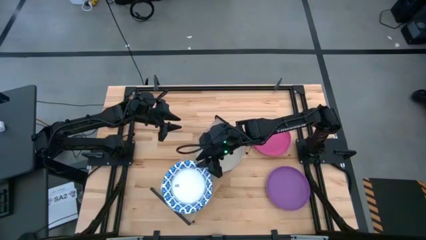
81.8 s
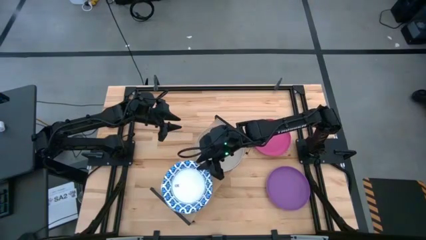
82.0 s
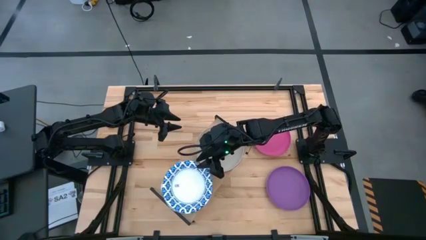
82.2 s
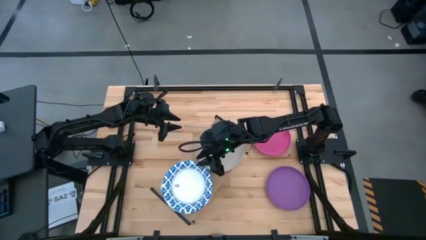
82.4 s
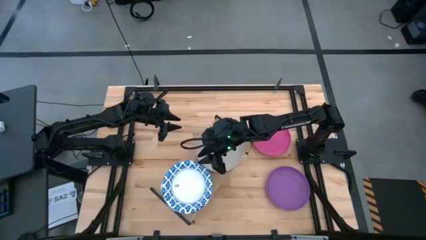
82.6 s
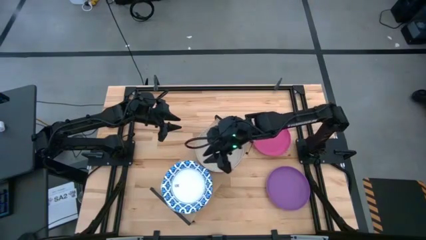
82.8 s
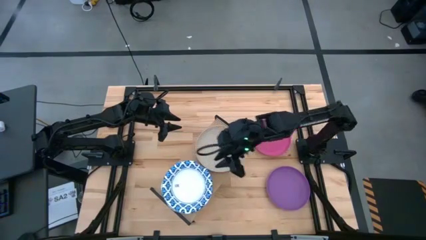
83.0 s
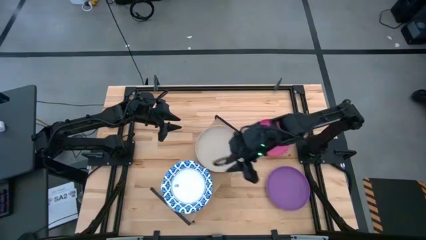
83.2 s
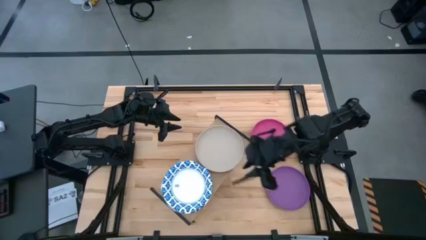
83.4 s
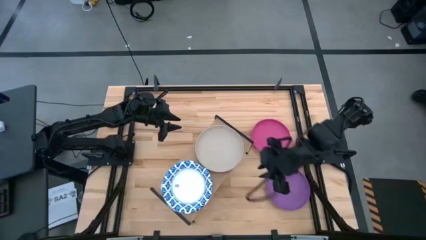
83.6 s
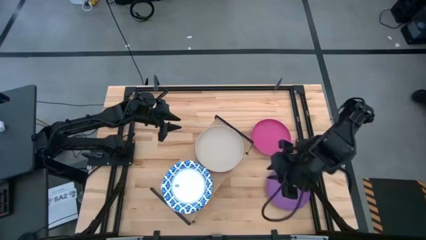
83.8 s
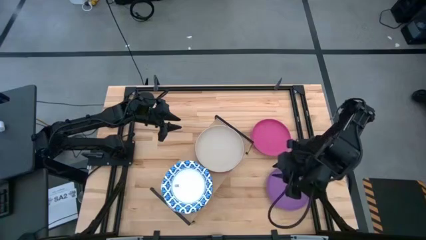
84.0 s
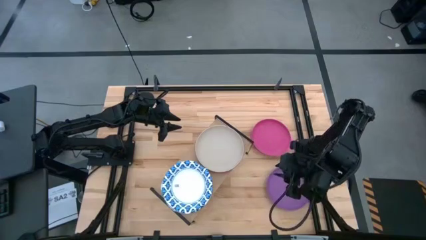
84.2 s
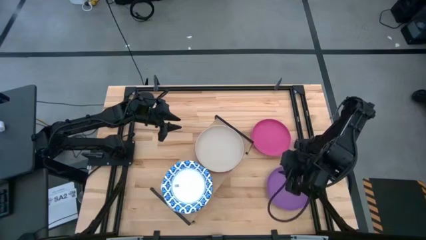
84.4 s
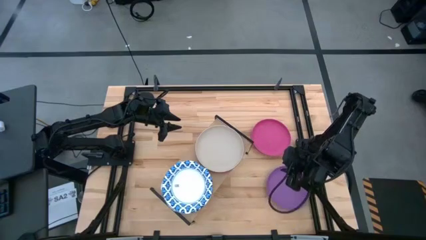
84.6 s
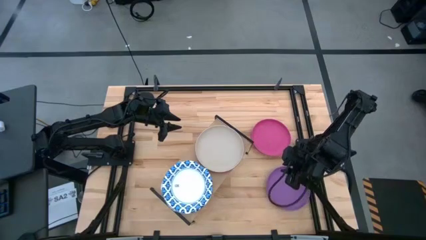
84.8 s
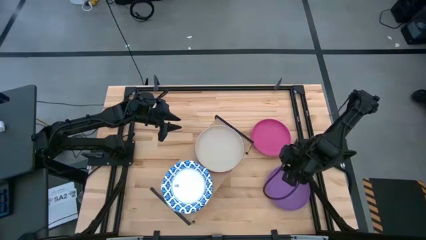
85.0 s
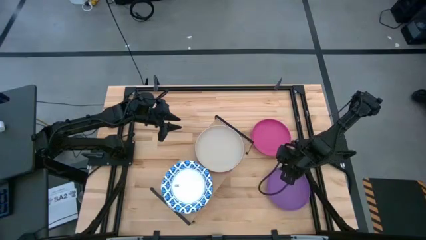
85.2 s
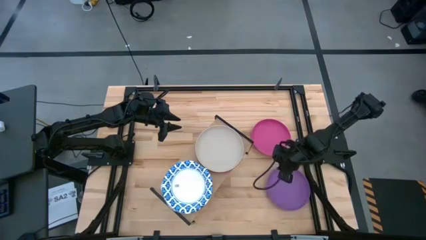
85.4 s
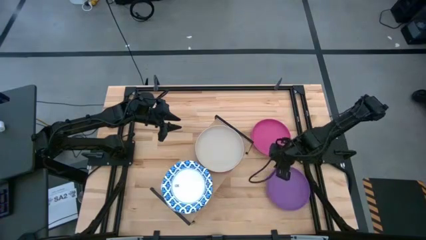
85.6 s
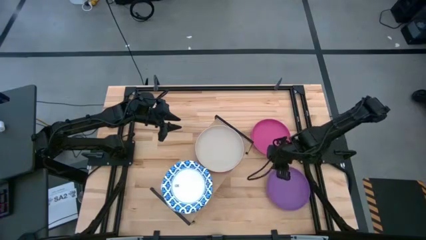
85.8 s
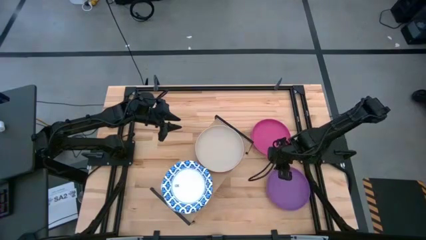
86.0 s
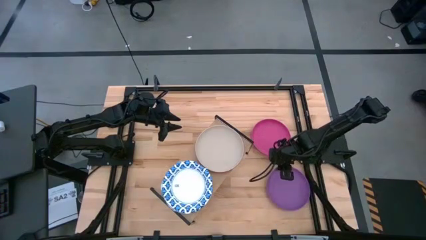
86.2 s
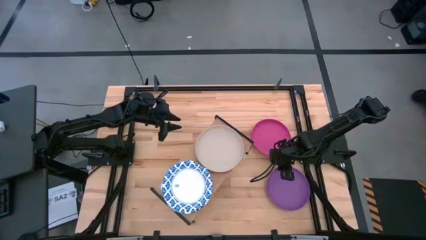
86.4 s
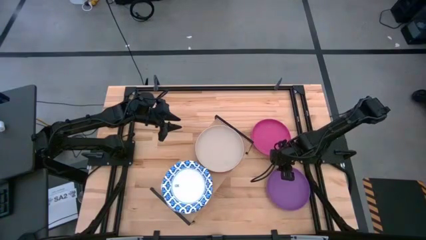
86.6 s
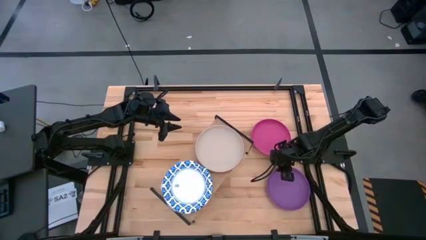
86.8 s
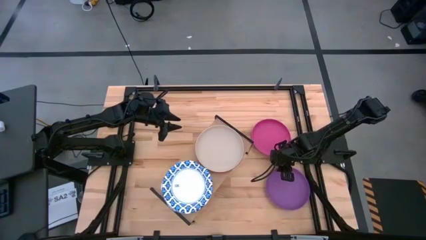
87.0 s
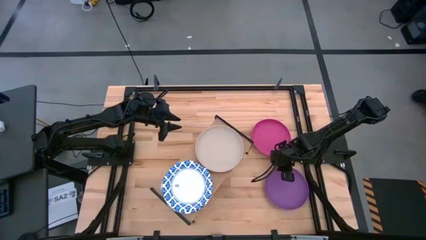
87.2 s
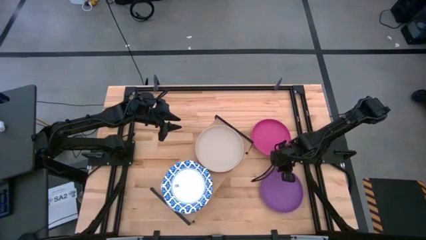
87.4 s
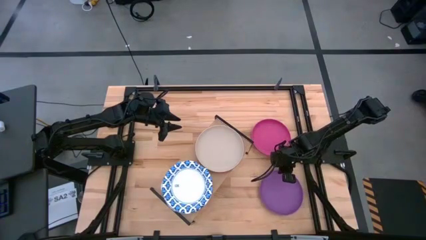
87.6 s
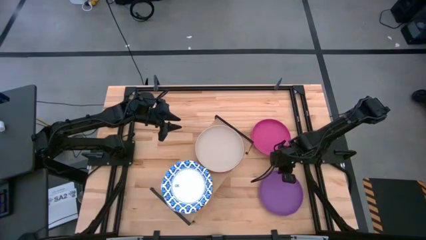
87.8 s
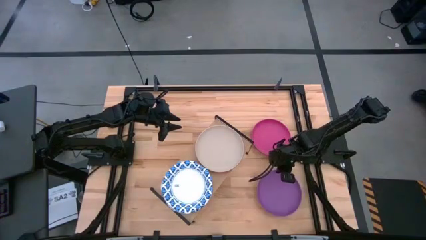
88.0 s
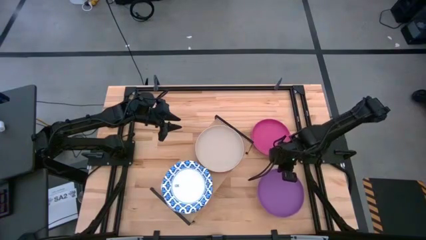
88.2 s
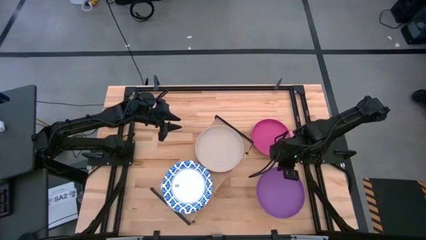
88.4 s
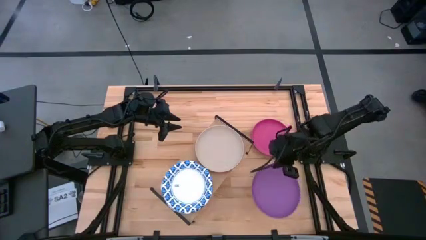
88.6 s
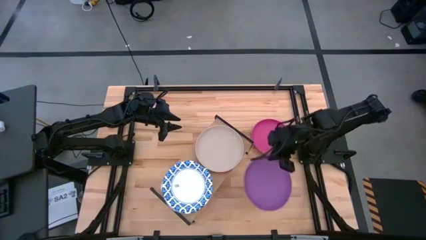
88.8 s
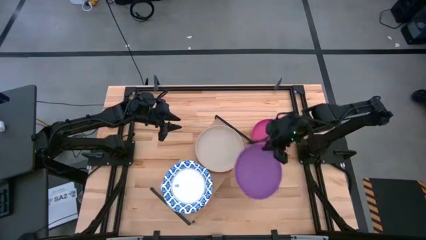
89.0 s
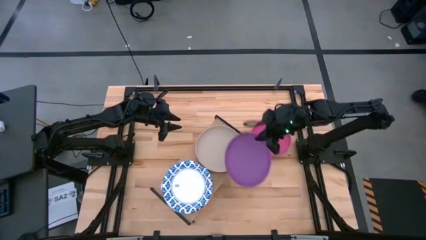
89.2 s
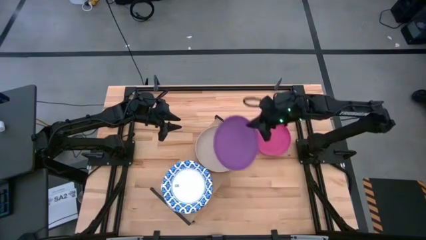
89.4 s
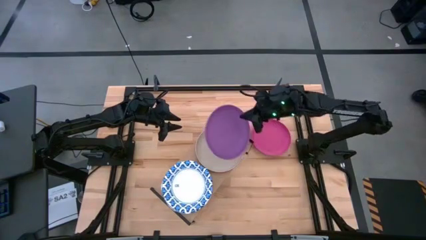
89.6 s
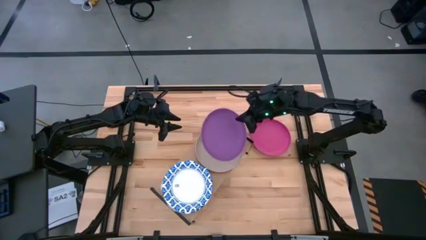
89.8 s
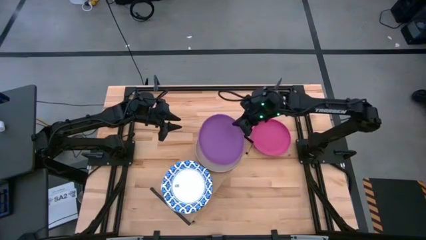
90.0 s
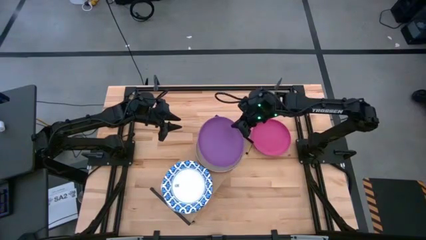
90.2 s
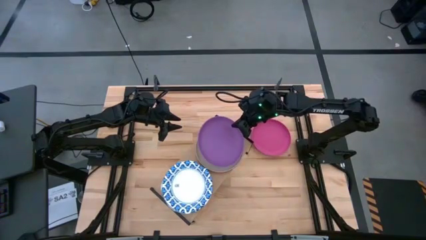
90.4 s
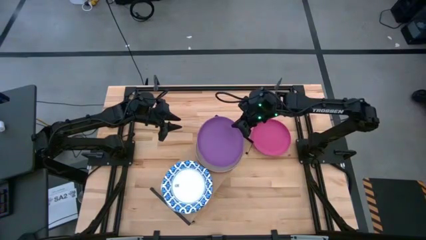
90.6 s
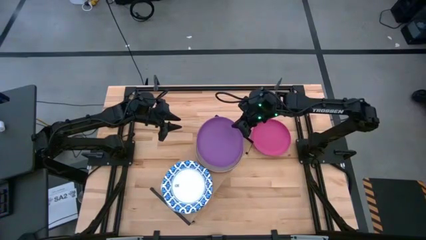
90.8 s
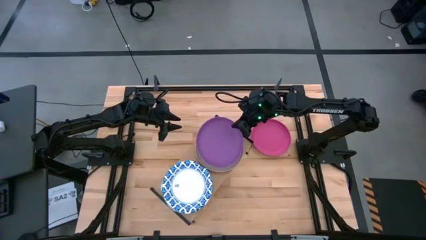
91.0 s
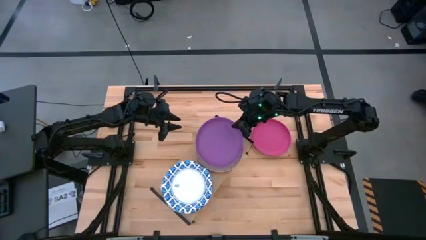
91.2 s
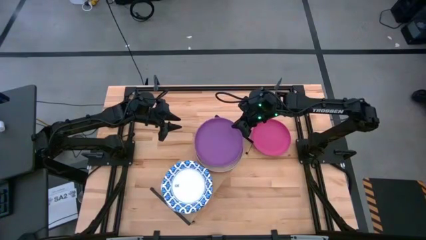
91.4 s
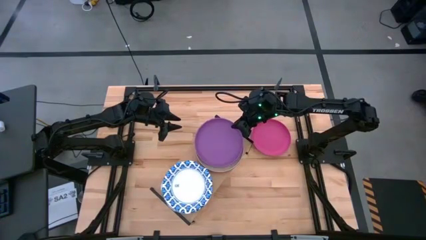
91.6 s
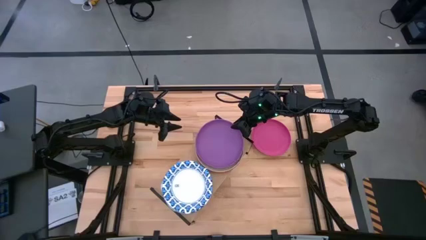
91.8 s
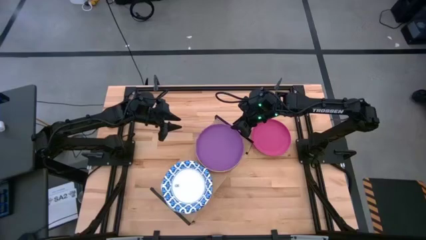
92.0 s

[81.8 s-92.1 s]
Task: Place and stack plates onto a shelf
Stack the purple plate on top of the gray plate on the shelf

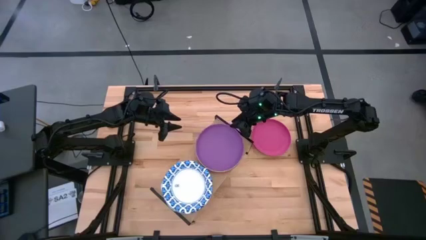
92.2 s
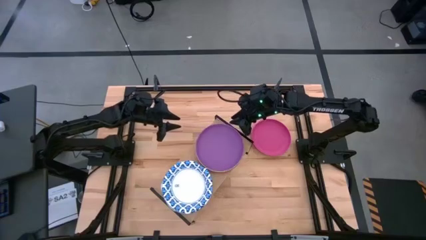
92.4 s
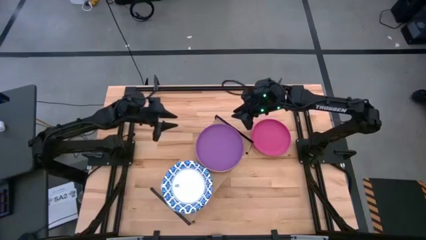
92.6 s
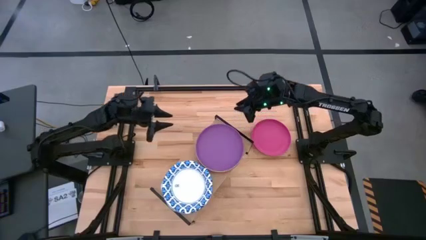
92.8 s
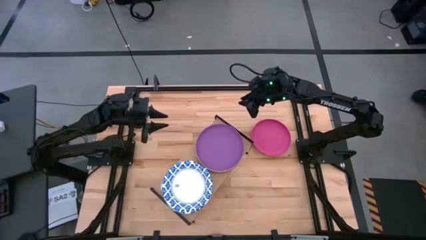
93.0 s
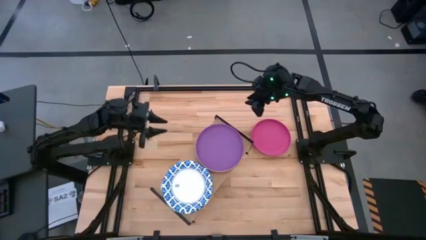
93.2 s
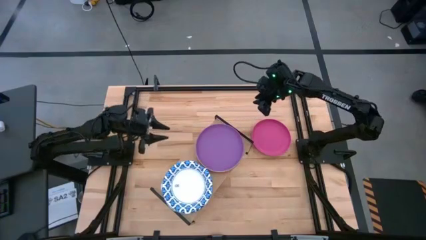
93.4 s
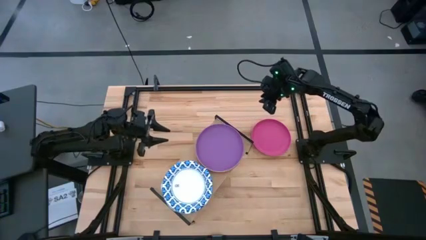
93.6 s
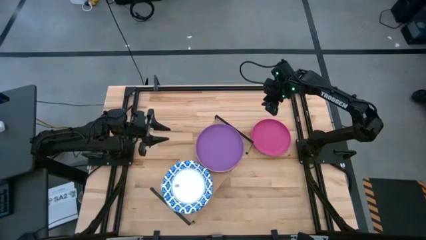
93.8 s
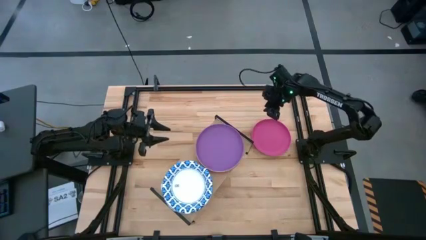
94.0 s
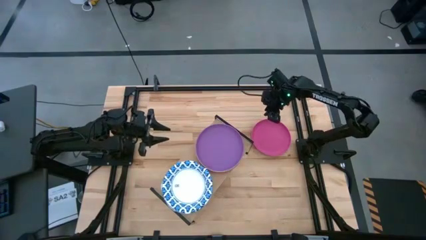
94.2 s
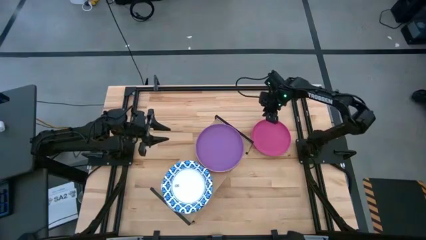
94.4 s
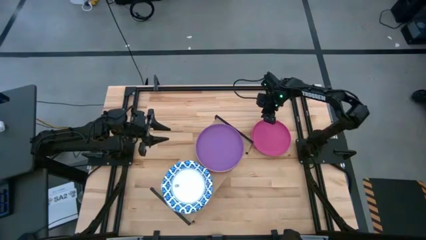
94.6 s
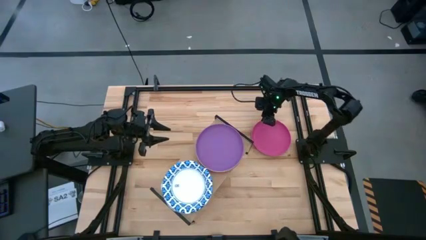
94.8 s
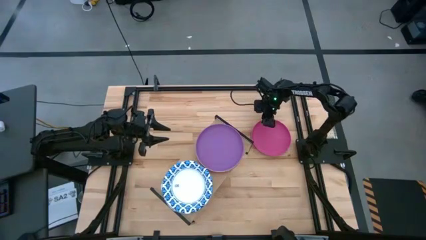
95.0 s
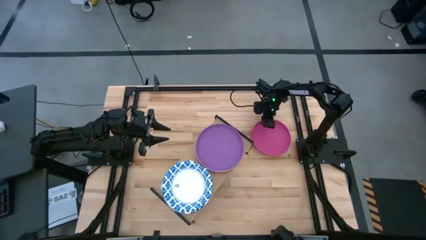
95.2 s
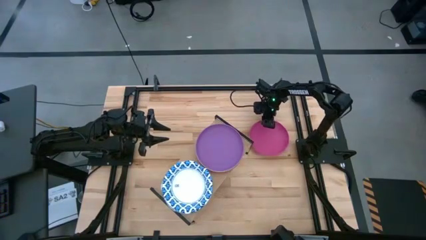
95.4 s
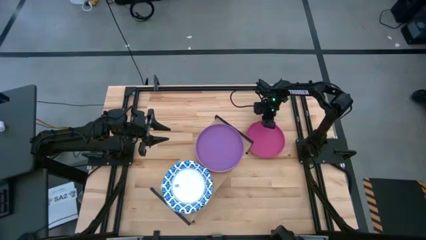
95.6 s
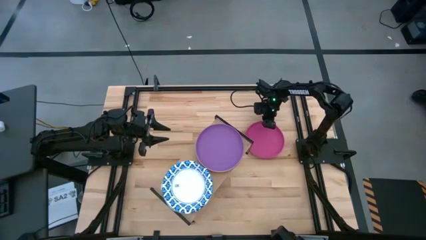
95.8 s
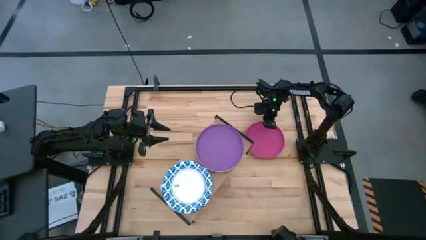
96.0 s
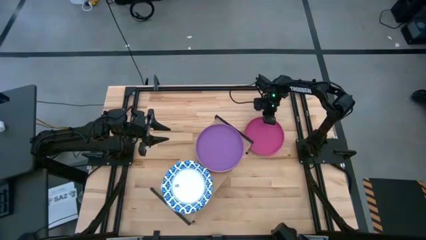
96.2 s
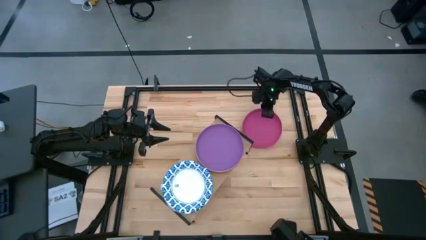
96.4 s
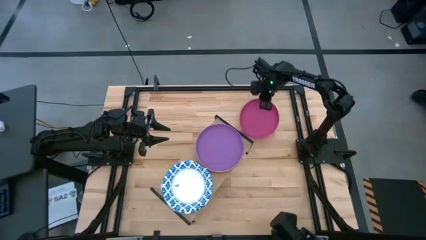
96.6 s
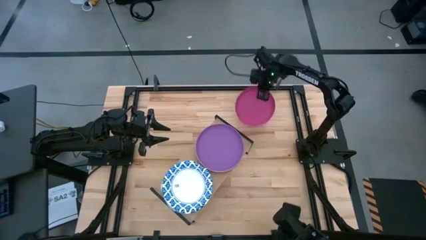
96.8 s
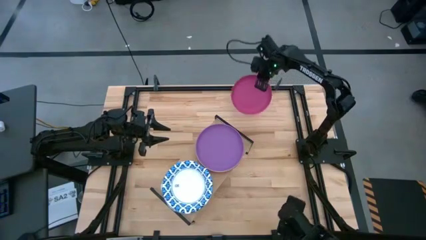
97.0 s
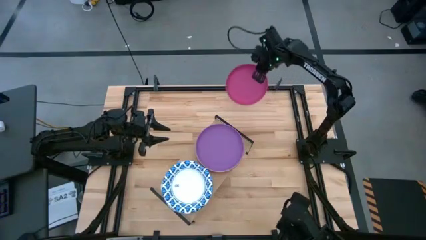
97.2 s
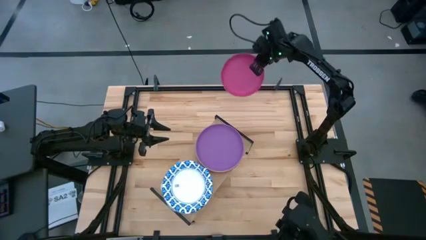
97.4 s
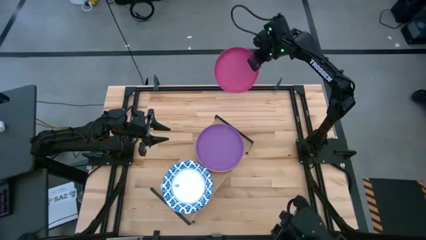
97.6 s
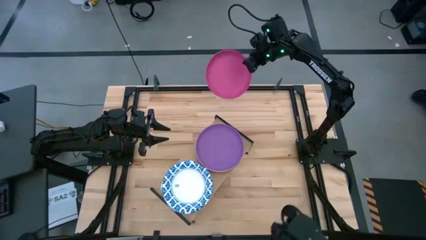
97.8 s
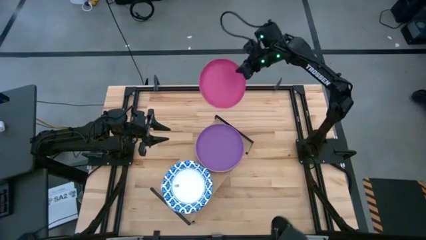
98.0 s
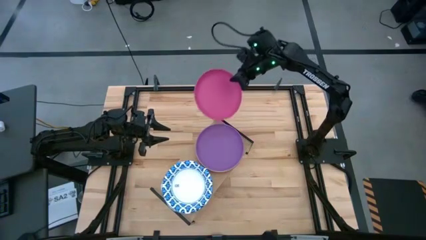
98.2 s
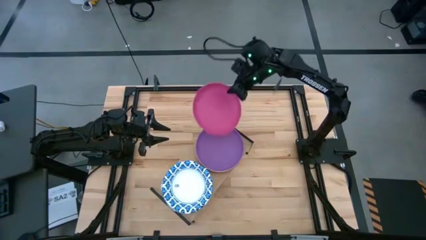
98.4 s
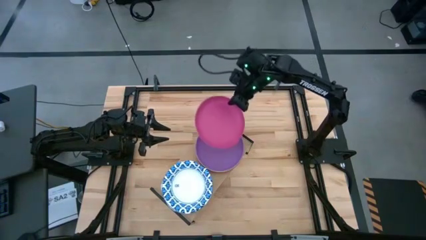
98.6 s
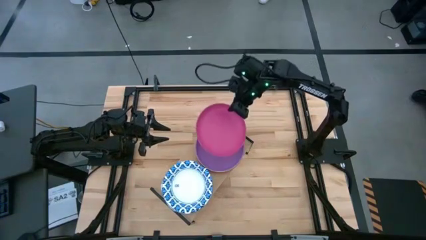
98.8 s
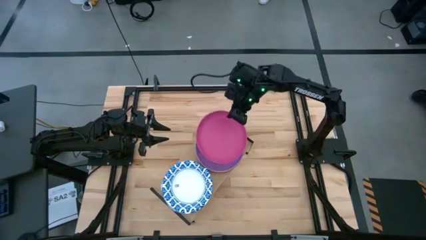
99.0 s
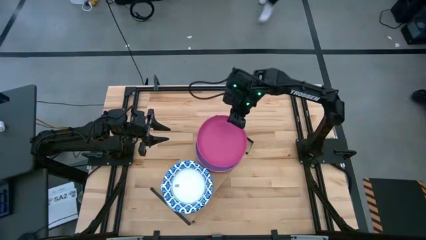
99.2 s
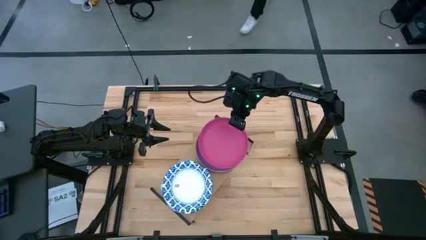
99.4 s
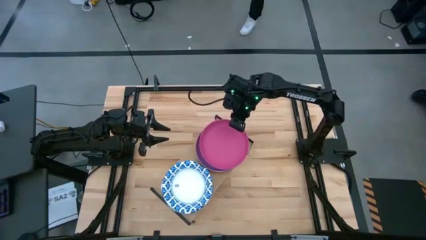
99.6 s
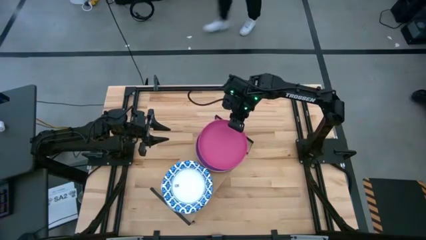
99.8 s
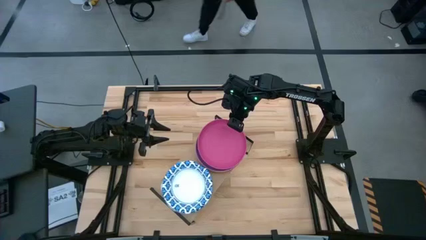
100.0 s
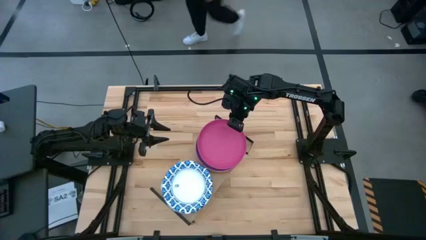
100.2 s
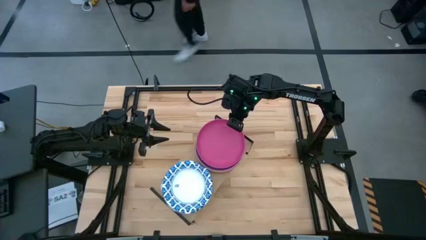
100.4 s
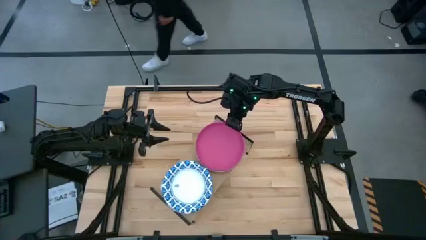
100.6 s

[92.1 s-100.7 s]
Stack the pink plate on top of the purple plate on the shelf
